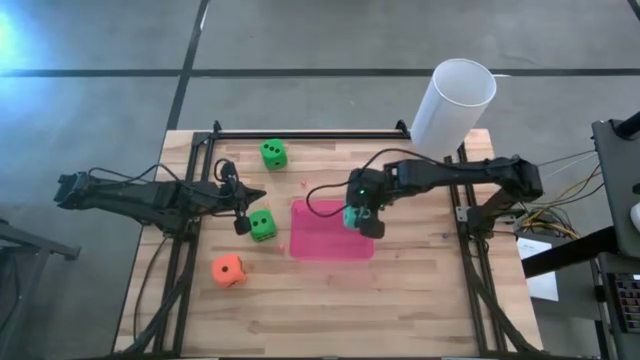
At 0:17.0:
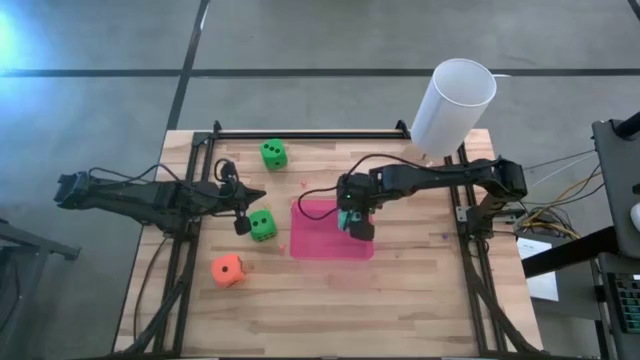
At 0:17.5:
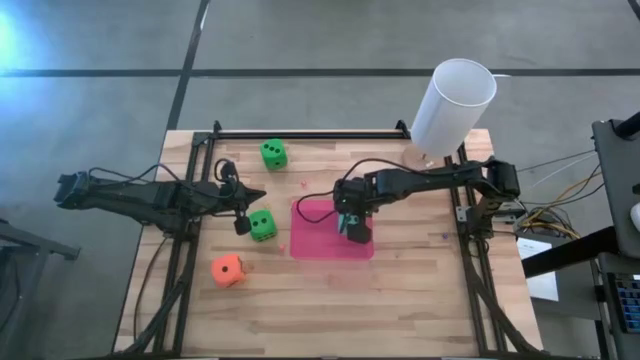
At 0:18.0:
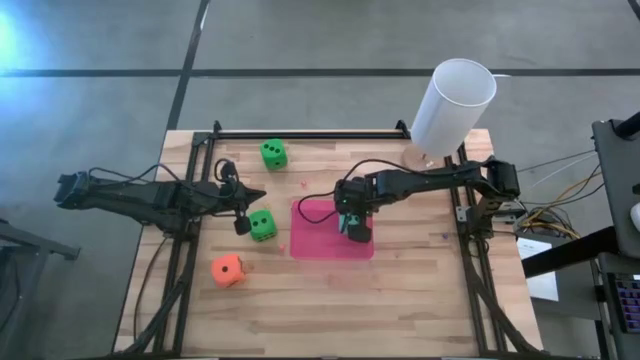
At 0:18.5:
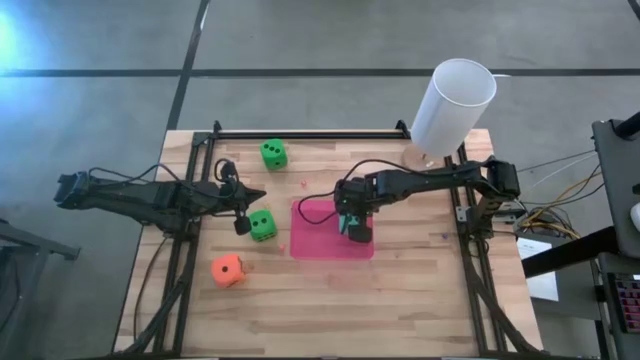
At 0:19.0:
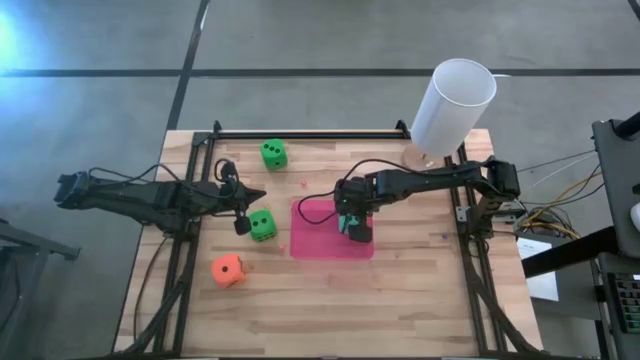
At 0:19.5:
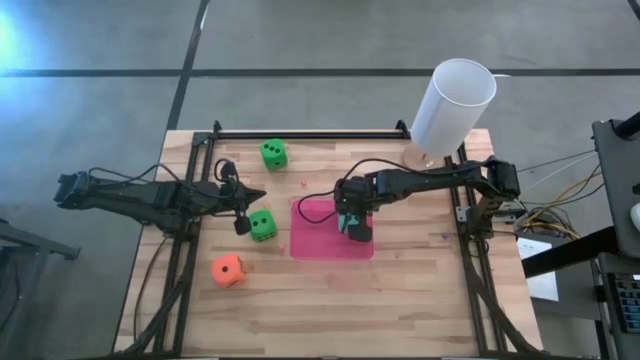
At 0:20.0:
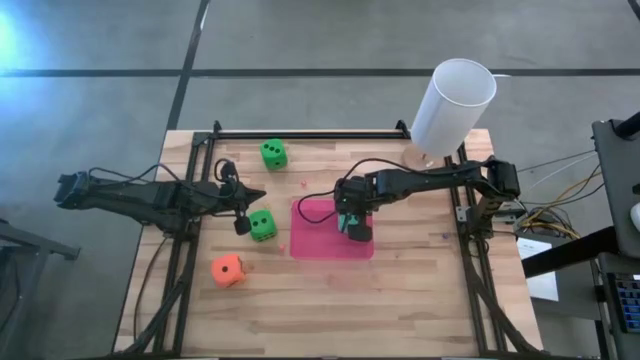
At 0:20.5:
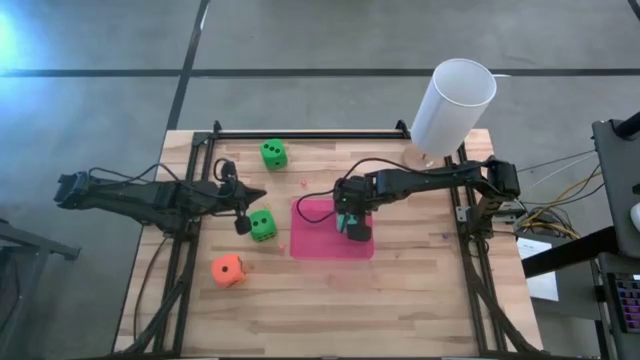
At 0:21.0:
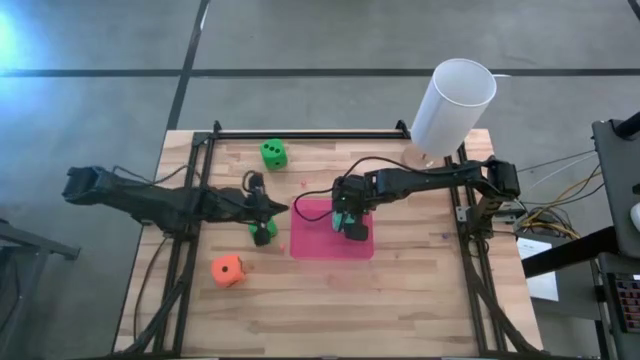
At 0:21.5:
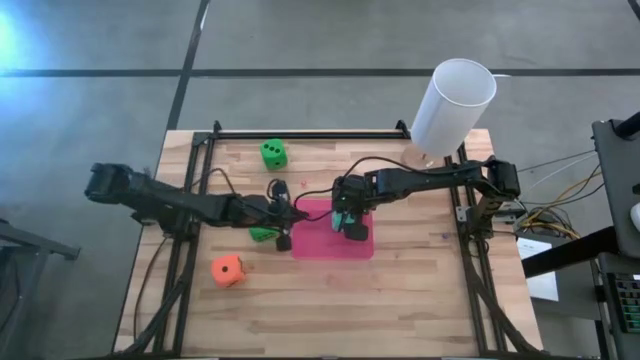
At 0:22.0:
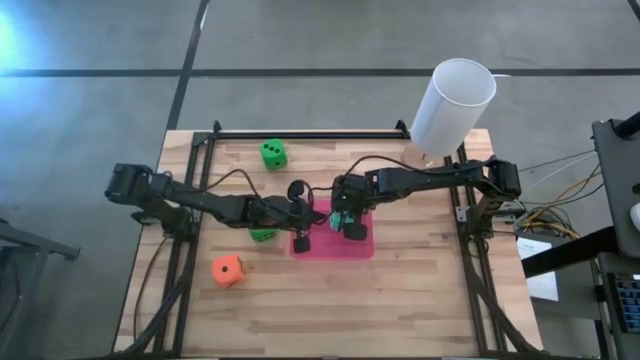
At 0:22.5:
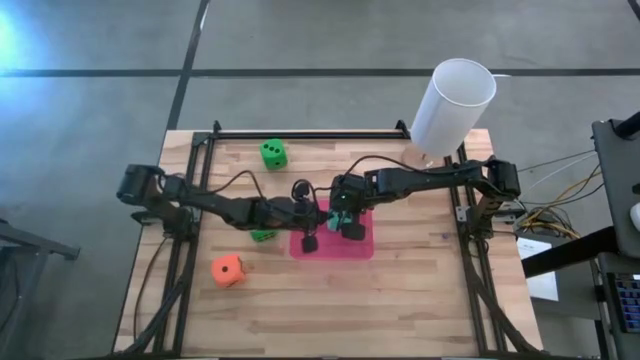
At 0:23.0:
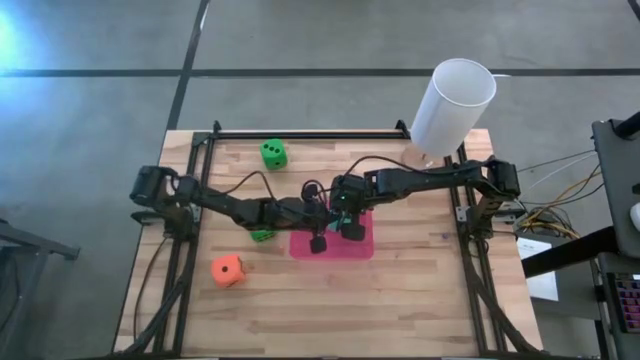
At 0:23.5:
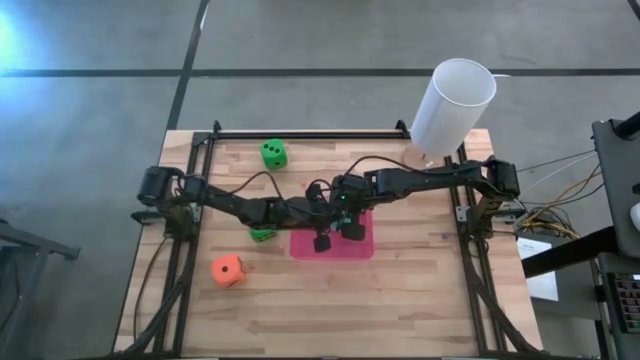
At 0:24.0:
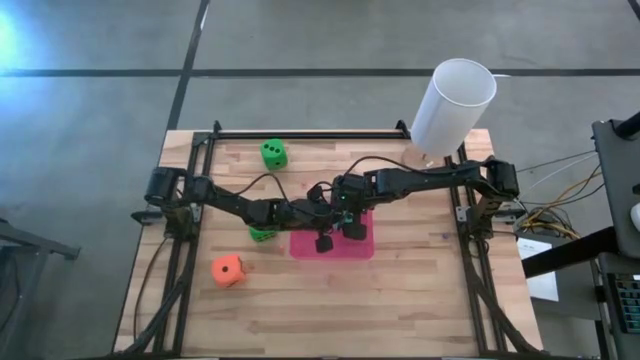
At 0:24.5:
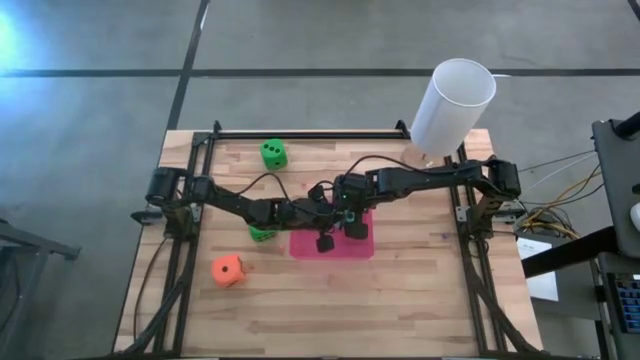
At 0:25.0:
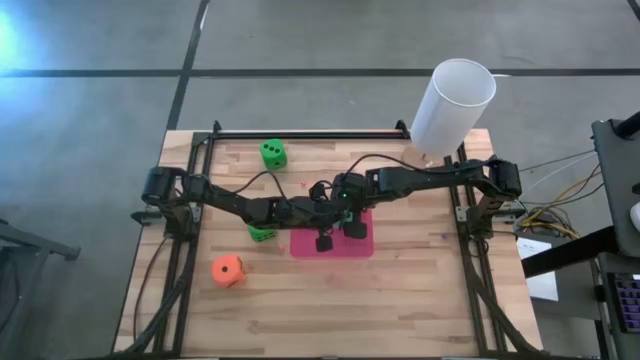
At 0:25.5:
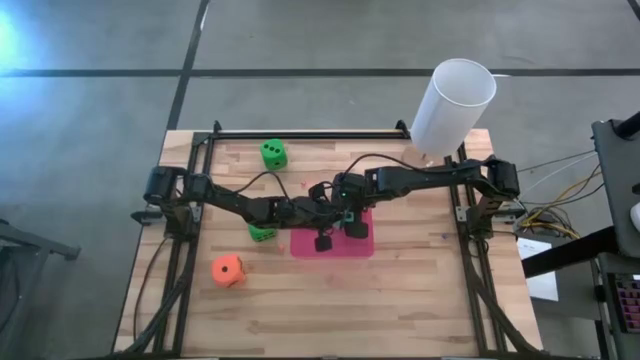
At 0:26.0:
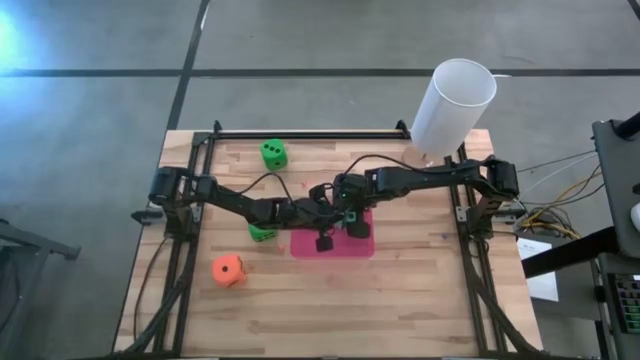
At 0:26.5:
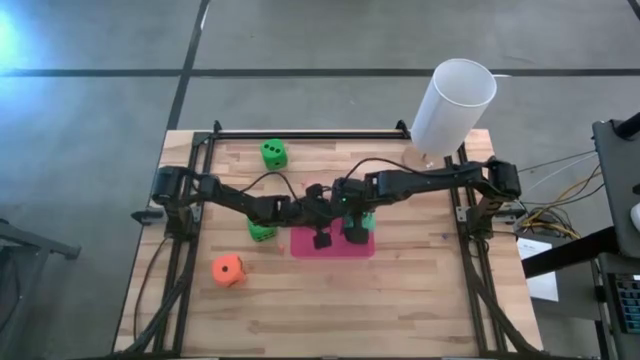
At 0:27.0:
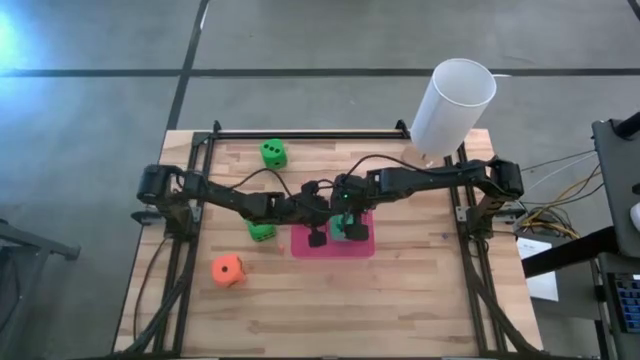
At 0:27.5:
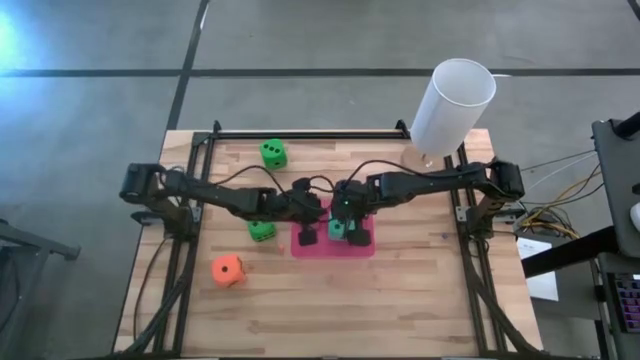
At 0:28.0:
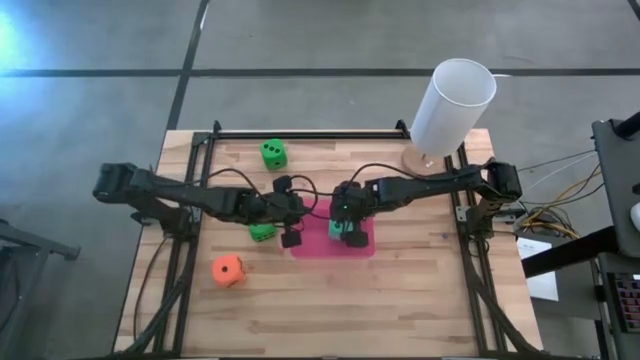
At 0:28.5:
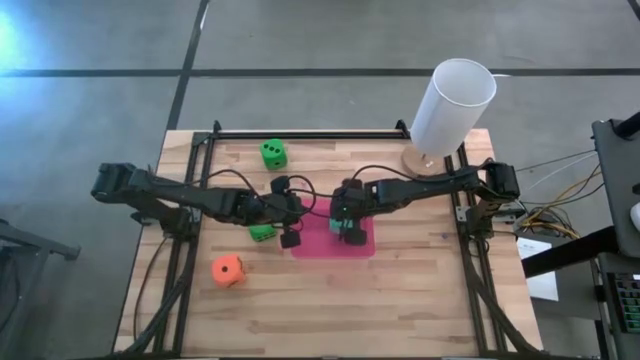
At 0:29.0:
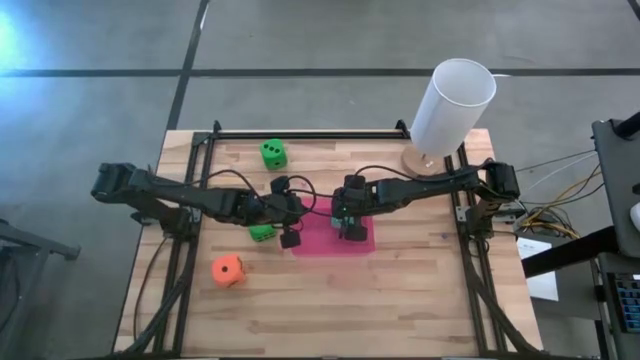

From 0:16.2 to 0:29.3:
Task: Pick & Place Dice
Put the large blue die into the pink bin

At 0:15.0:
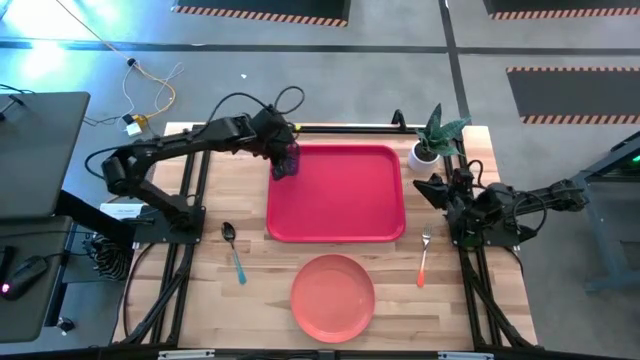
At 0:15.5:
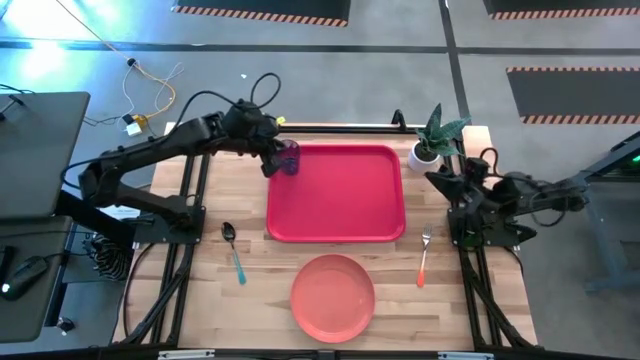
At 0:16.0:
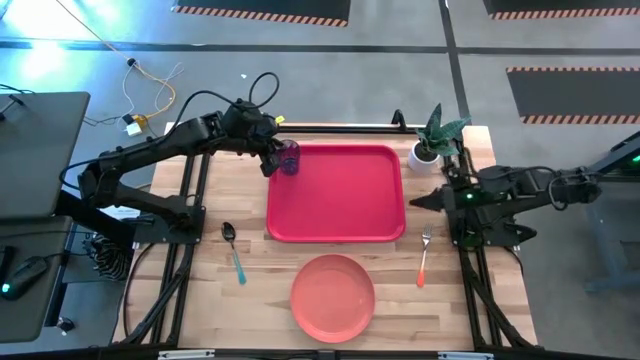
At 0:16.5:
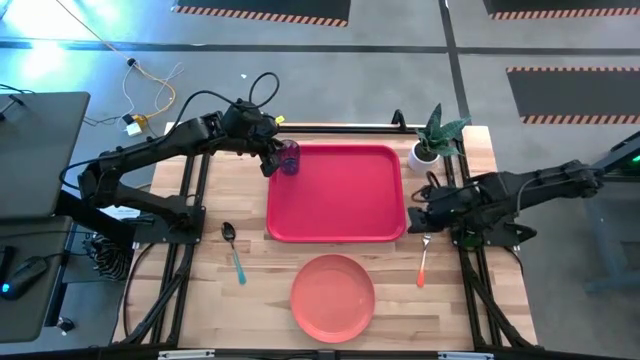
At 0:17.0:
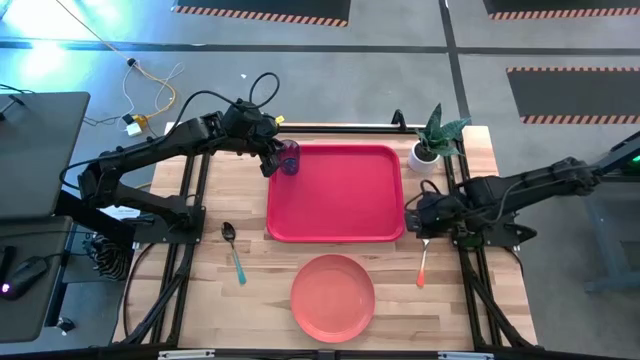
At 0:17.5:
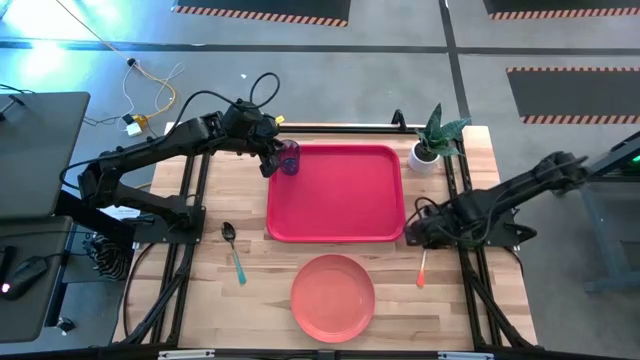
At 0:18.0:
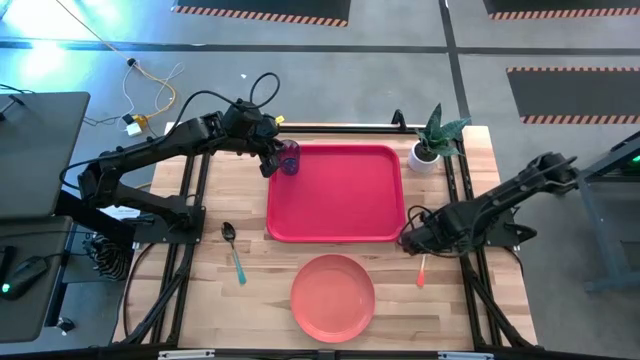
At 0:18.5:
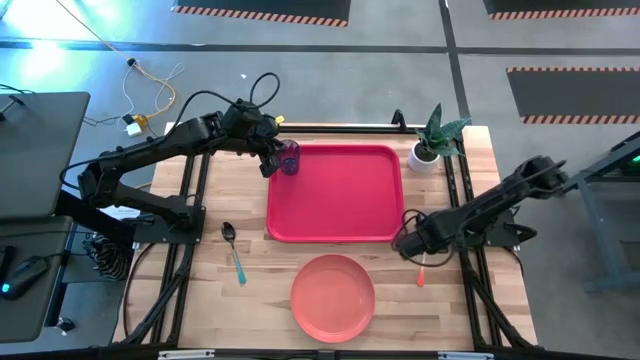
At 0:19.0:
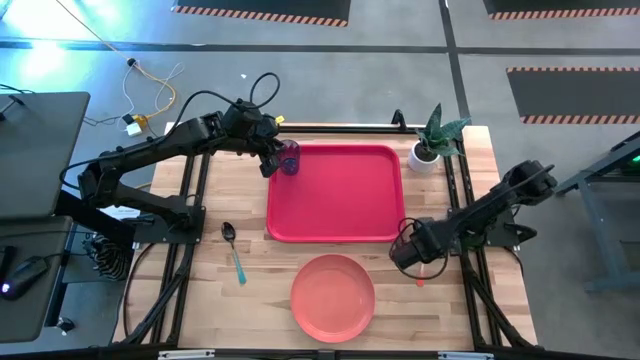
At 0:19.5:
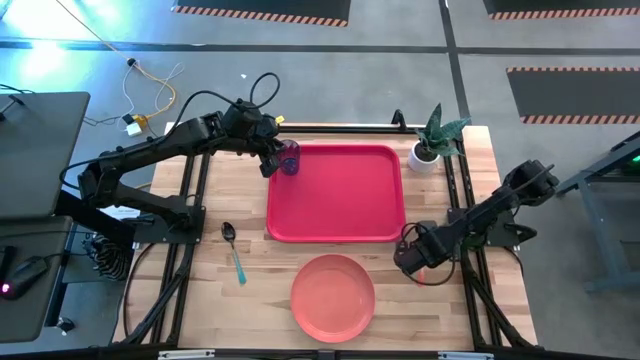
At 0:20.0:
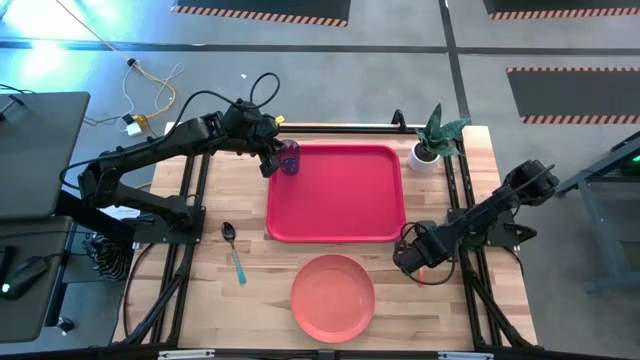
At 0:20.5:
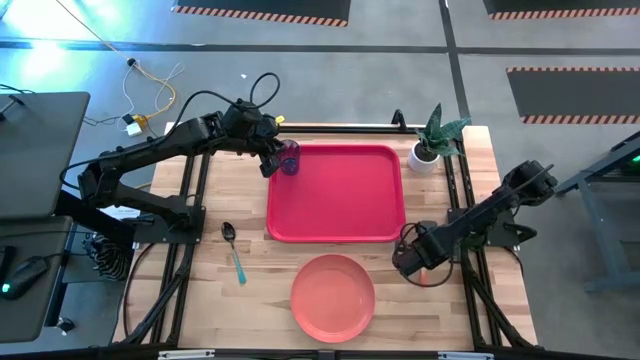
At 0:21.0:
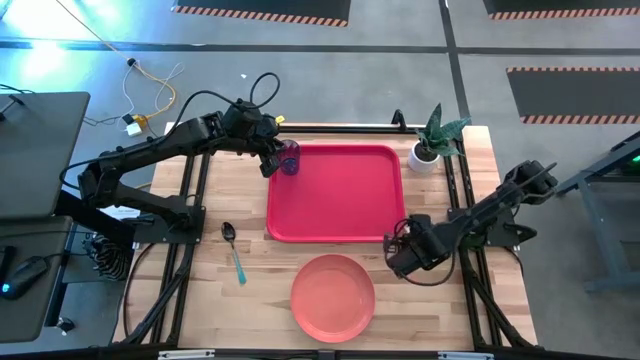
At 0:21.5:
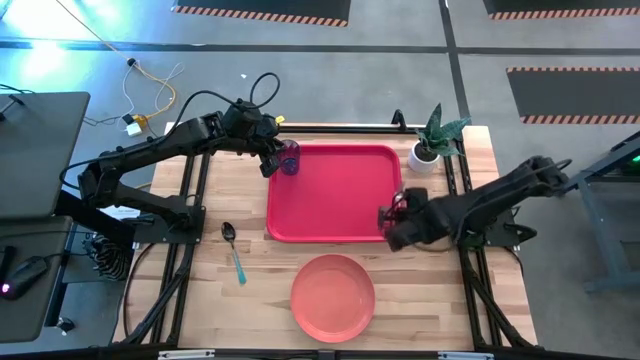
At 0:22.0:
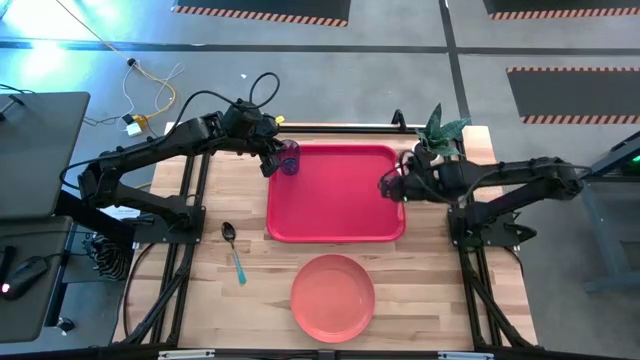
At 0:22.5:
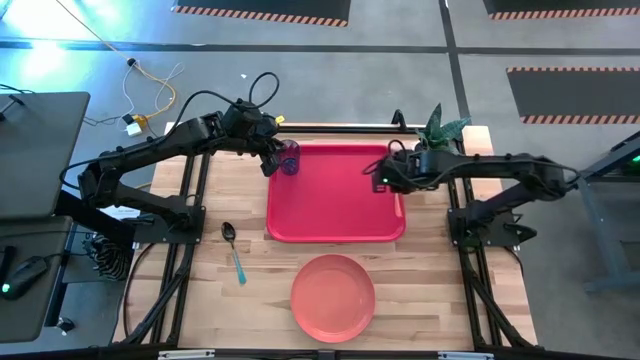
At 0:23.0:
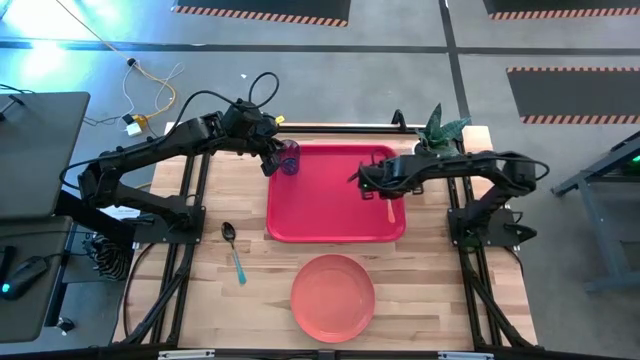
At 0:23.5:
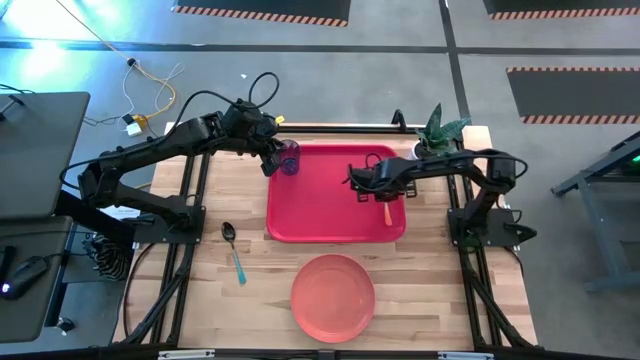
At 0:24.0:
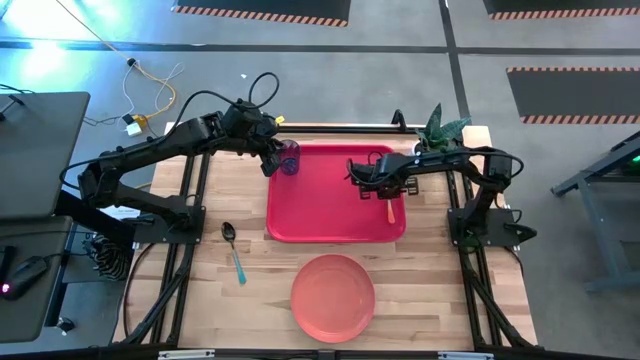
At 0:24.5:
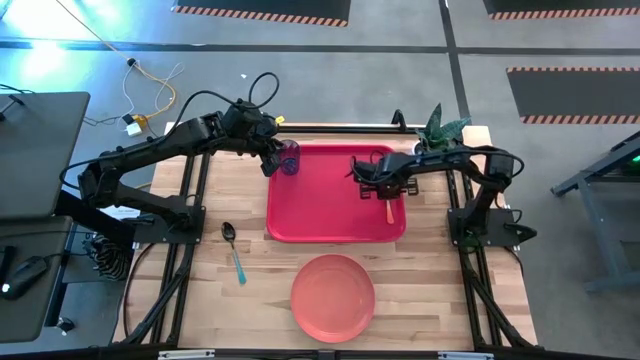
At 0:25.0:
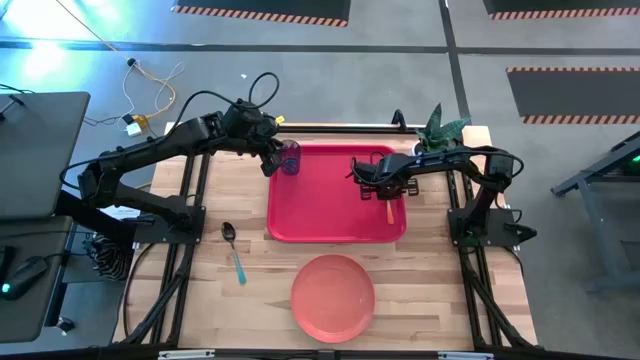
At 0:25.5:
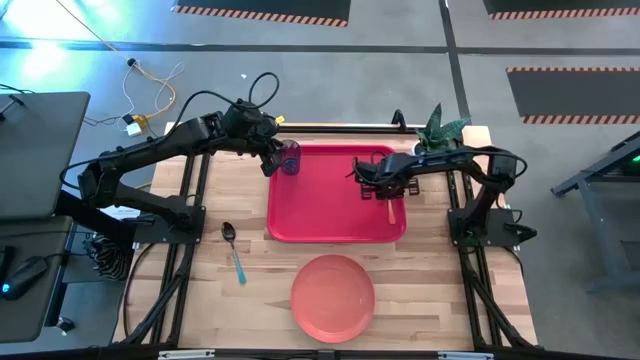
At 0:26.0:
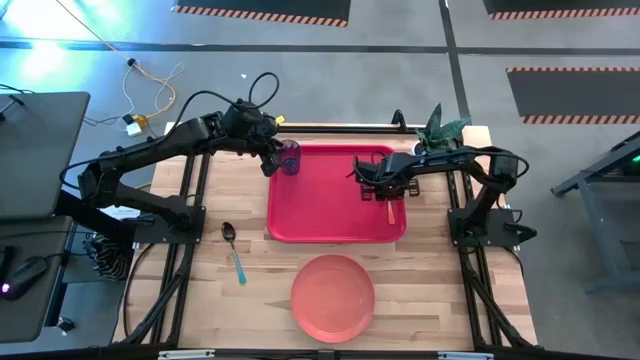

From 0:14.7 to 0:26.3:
Task: Pick and place plate/cup/fork/spoon on tray
Put the orange fork on the red serving tray to the right
